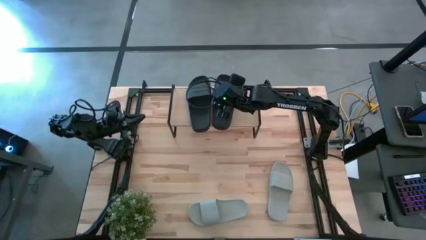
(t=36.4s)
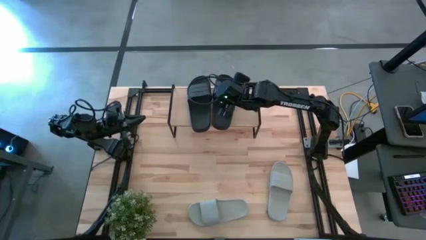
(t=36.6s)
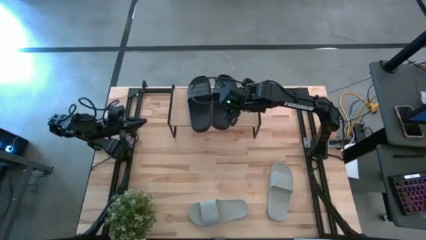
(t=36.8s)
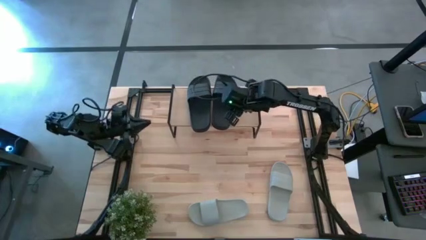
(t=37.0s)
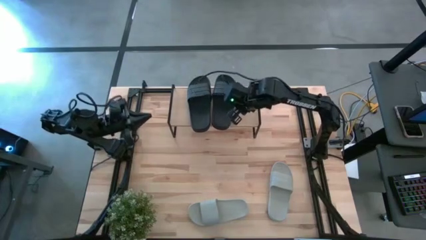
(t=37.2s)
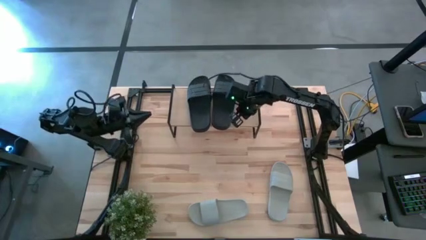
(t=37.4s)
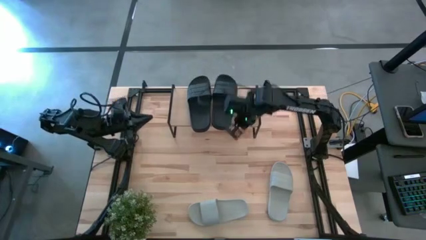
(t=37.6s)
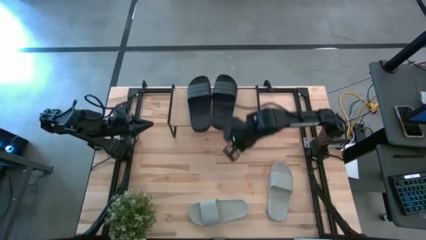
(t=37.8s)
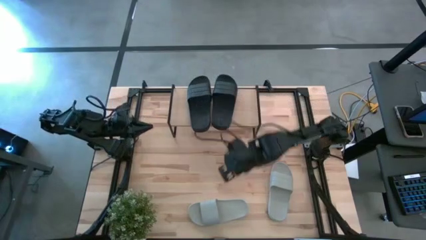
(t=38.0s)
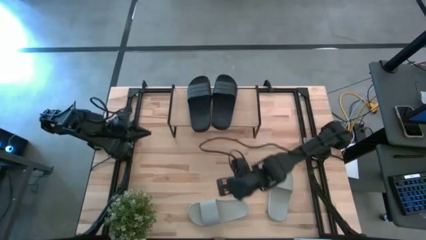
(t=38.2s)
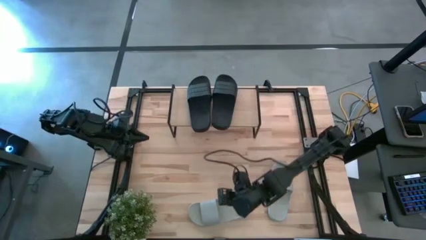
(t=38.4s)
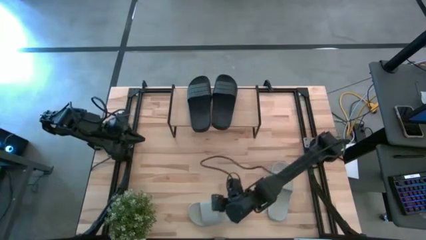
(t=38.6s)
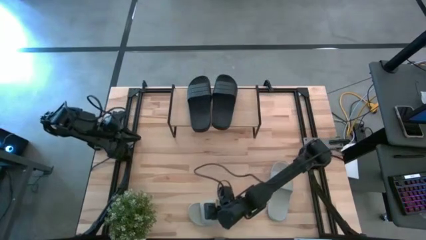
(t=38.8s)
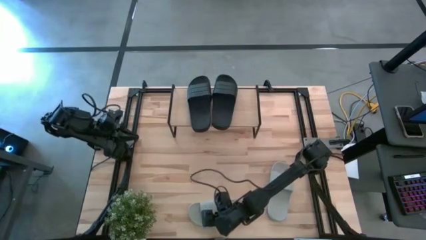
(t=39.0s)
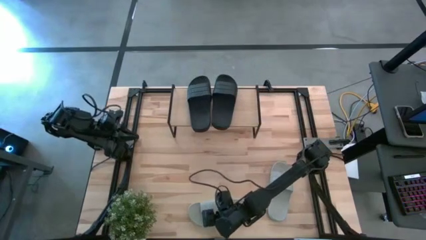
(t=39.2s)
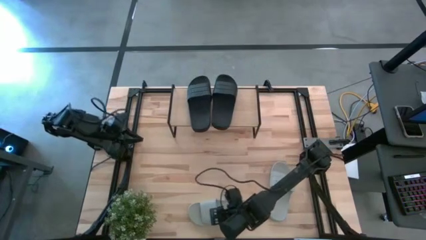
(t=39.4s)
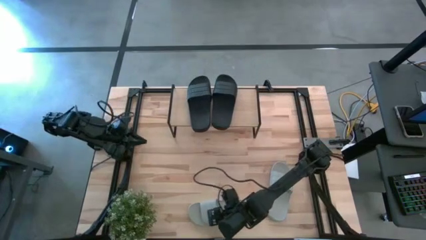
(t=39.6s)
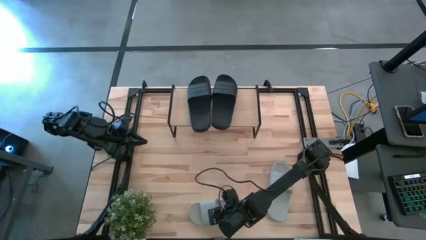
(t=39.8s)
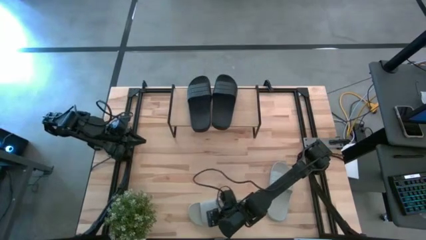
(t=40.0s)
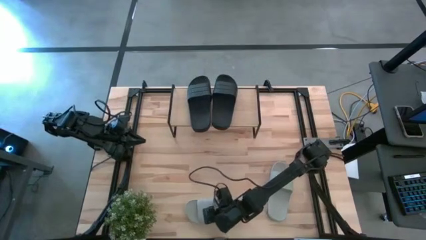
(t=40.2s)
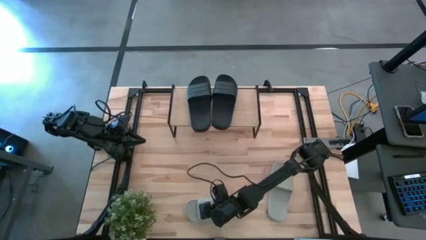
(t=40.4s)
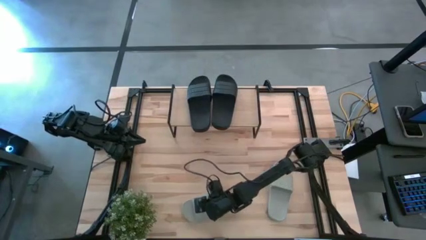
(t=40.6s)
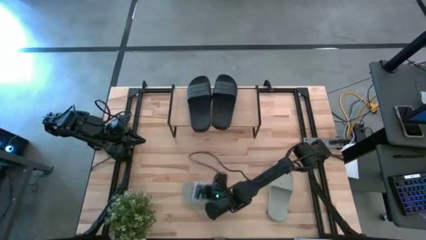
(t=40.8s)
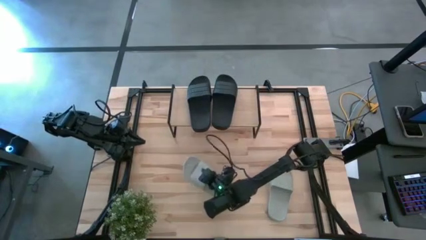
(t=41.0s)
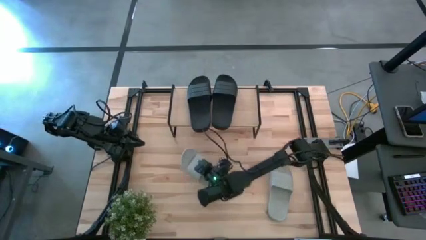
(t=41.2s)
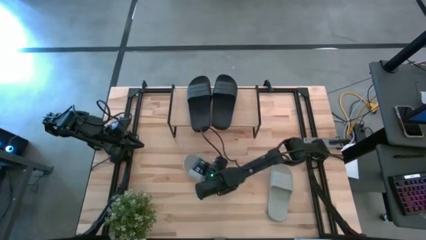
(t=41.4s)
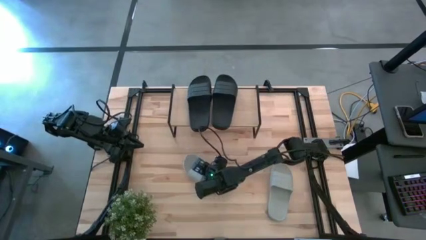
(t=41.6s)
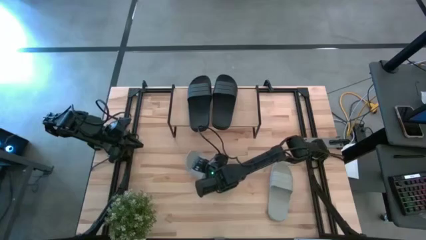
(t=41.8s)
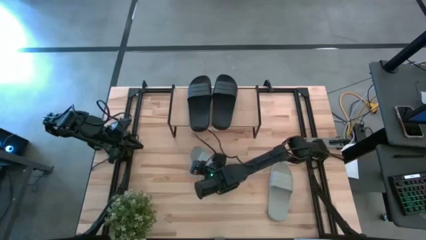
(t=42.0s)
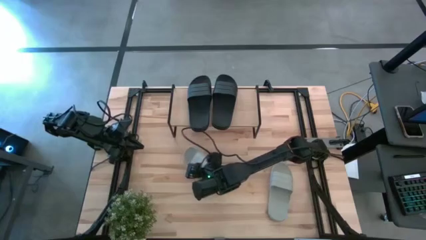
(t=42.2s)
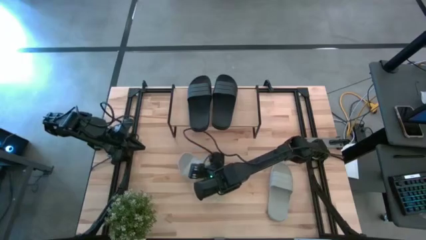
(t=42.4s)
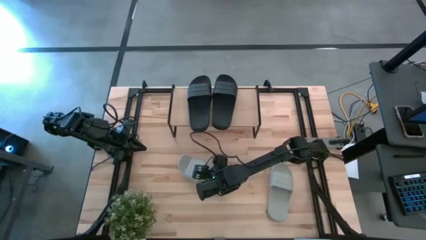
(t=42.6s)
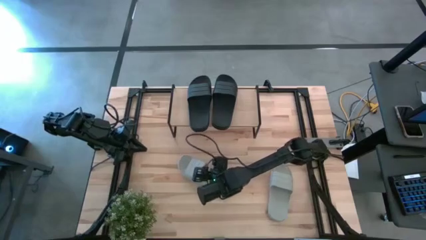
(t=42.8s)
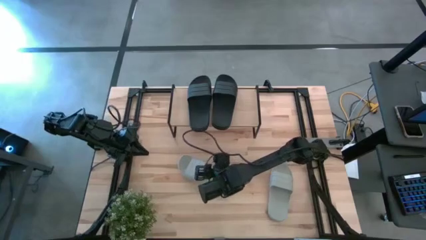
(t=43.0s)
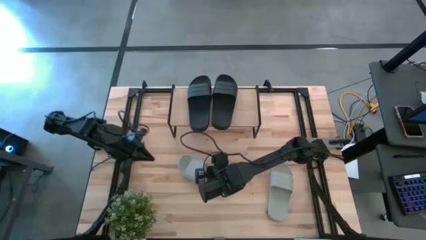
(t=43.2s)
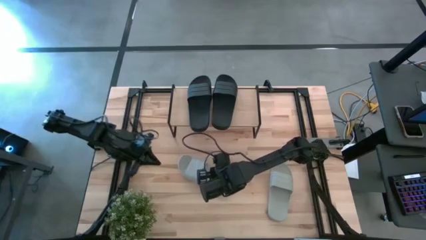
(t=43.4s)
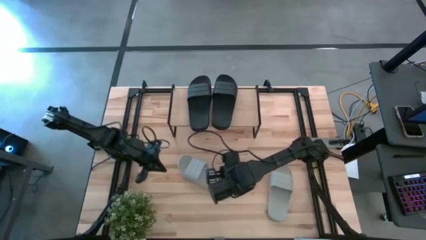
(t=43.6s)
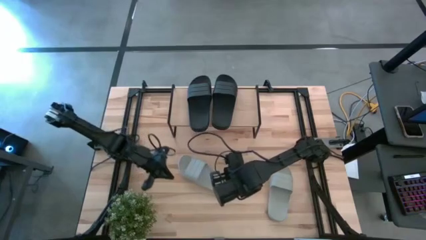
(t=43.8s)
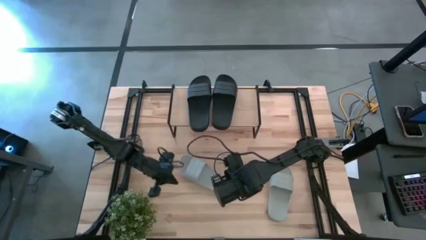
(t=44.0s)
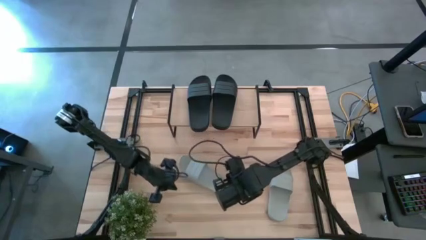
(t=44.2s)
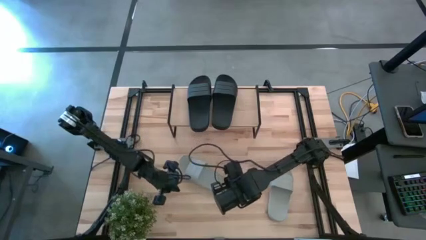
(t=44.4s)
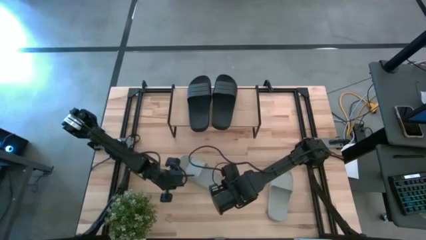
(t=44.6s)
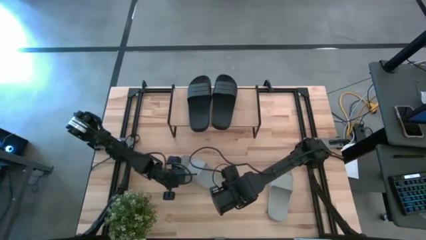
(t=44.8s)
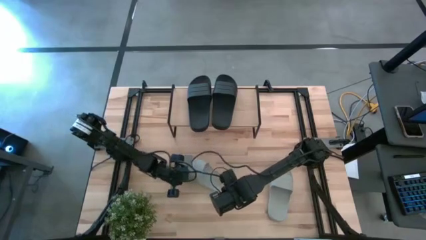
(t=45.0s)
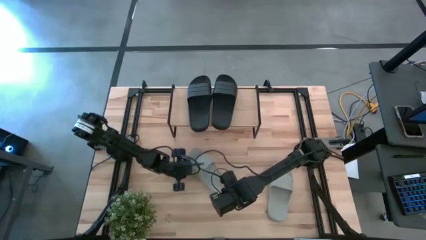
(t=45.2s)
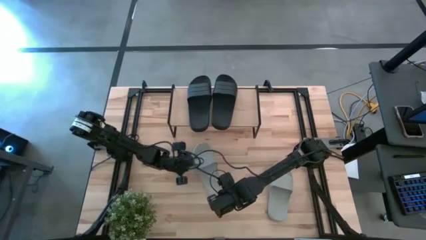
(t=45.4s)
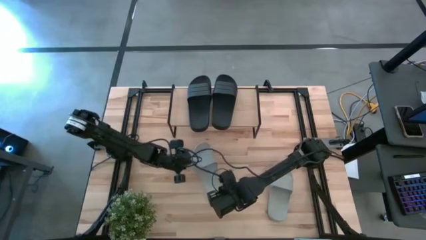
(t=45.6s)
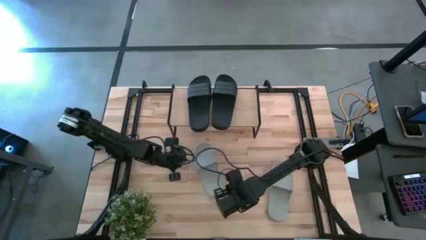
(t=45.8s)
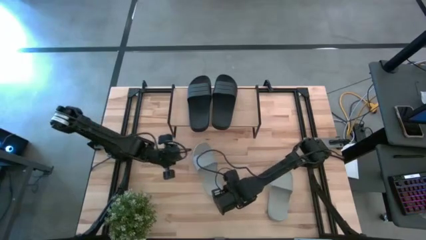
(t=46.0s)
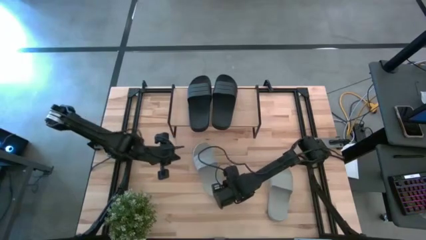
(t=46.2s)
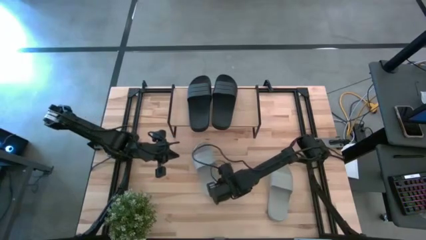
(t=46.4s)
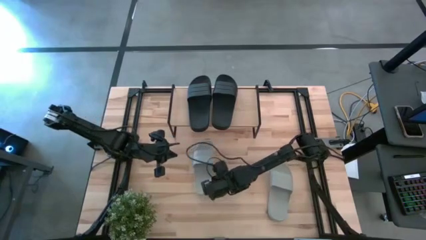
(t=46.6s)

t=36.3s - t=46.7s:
Task: Pick and place slides into the shelf
Move the left white slide to the center of the table

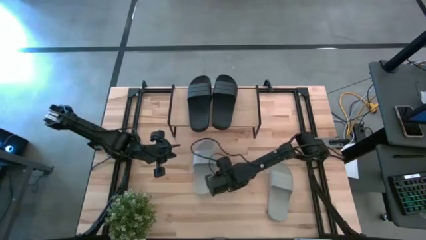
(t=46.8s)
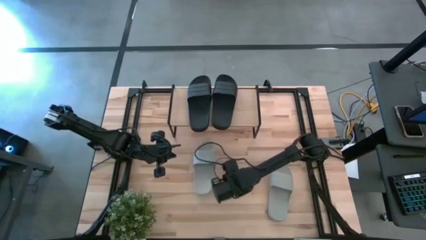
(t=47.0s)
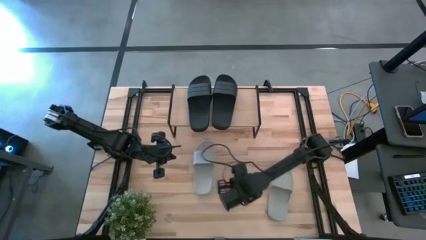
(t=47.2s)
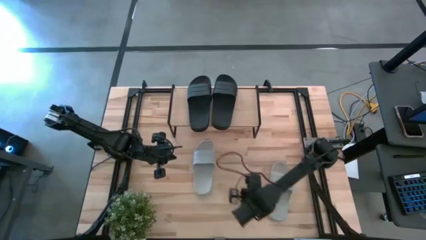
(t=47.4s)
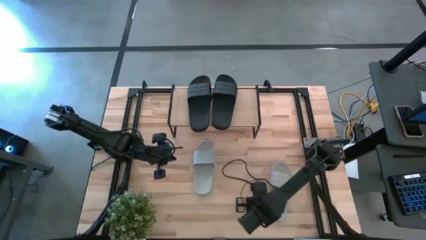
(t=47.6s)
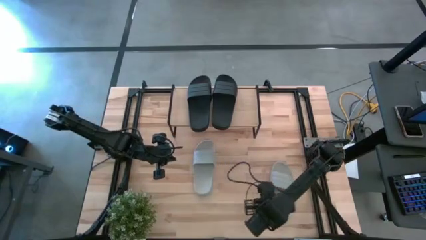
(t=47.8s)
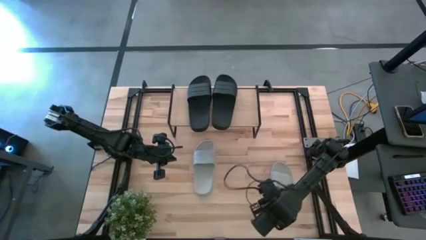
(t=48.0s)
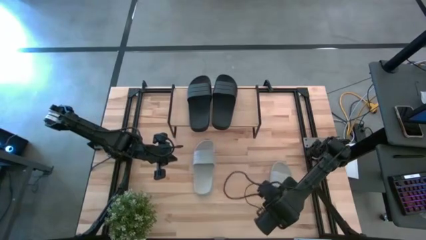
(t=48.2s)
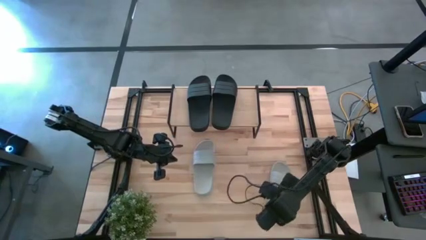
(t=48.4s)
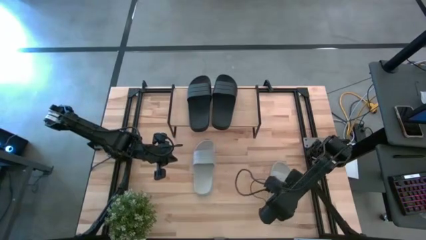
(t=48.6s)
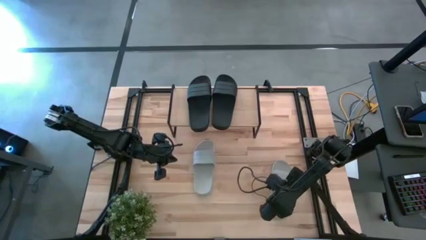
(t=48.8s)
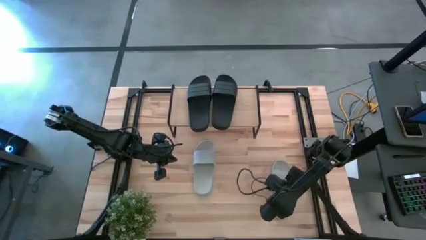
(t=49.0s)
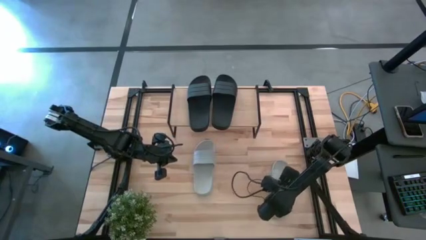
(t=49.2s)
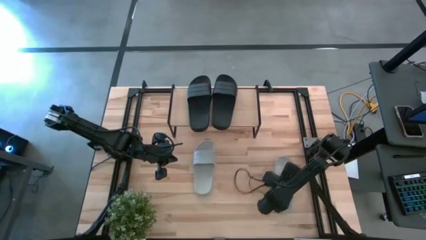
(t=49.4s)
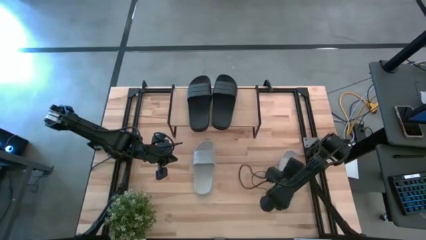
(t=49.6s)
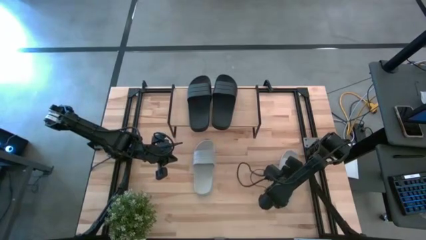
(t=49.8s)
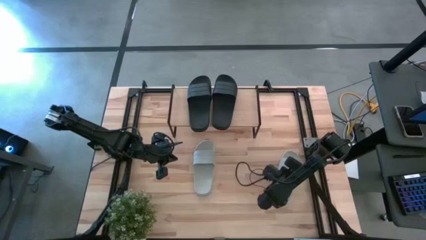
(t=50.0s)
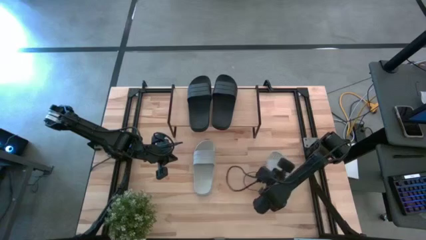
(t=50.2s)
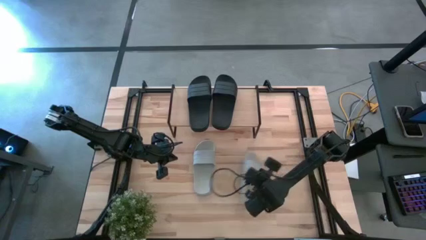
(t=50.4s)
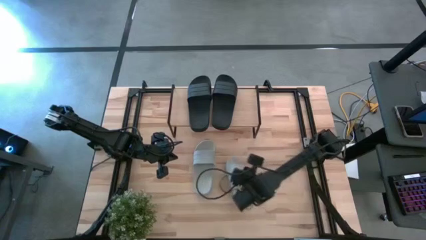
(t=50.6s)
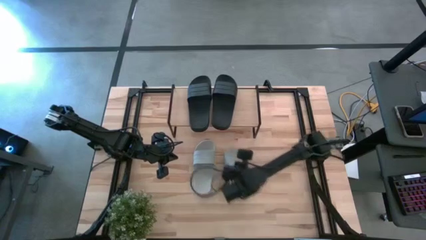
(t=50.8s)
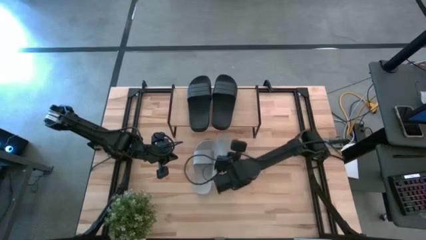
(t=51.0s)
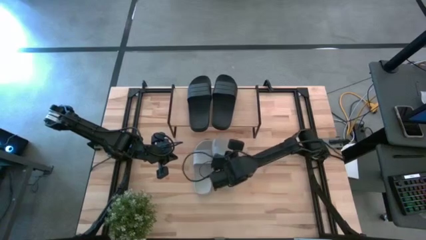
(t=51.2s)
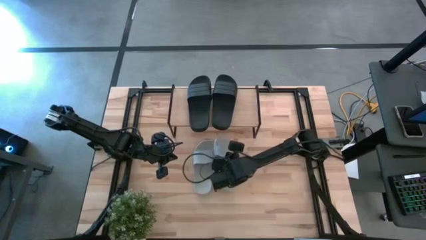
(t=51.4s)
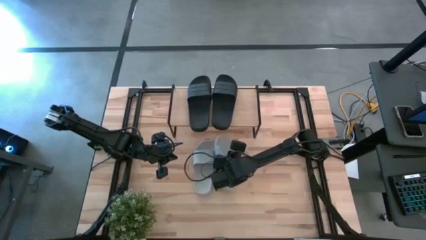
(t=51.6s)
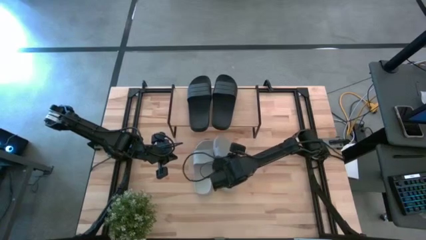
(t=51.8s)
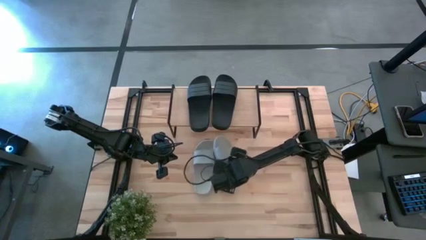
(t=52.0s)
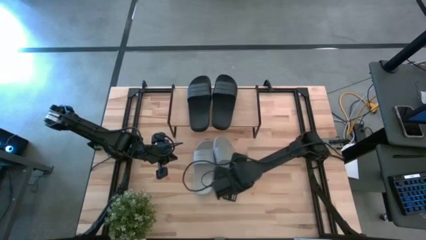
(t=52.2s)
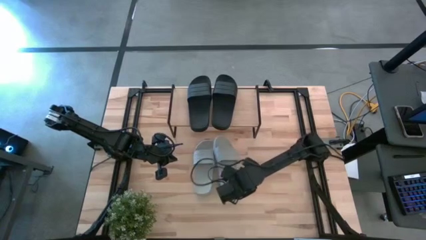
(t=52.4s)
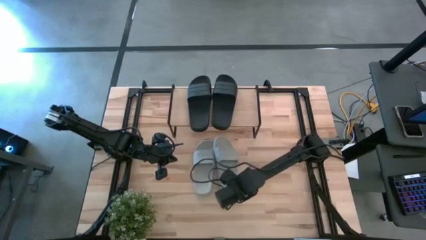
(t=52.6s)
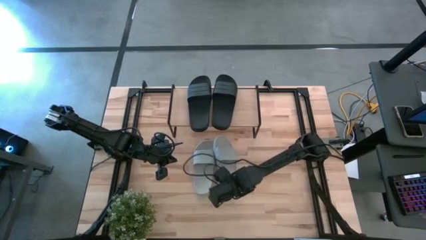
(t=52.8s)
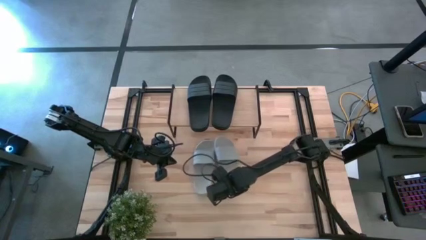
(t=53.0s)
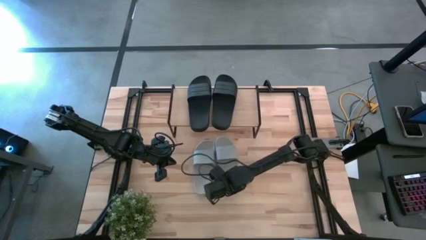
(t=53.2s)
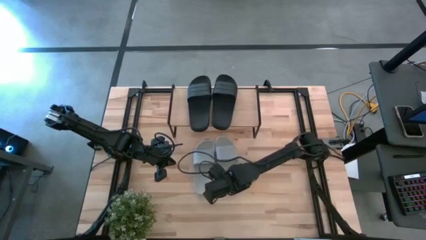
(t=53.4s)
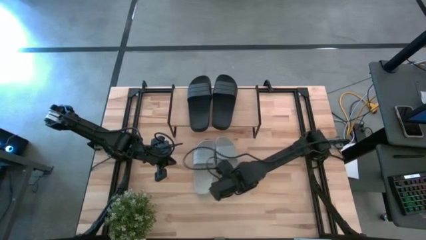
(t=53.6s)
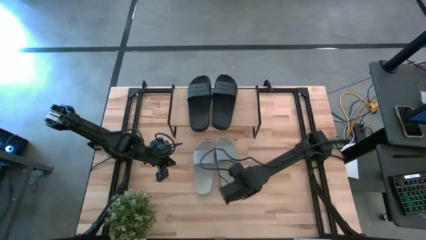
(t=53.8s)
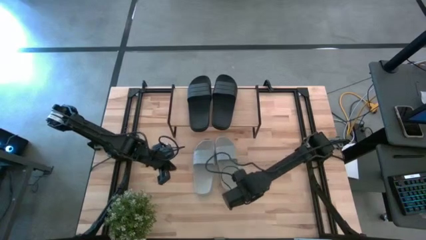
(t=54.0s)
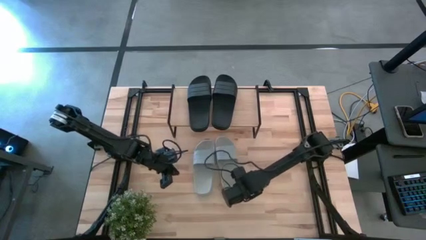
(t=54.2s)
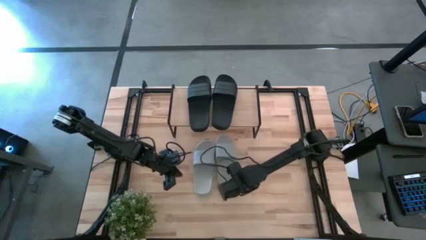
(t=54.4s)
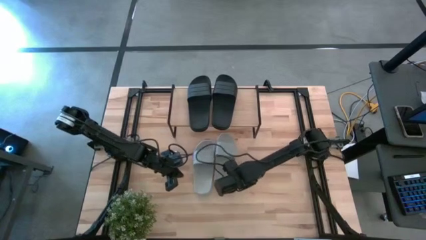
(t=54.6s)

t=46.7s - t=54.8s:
Move the right white slide to the center of the table
